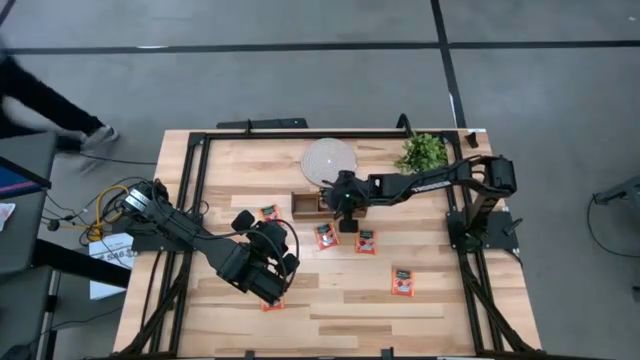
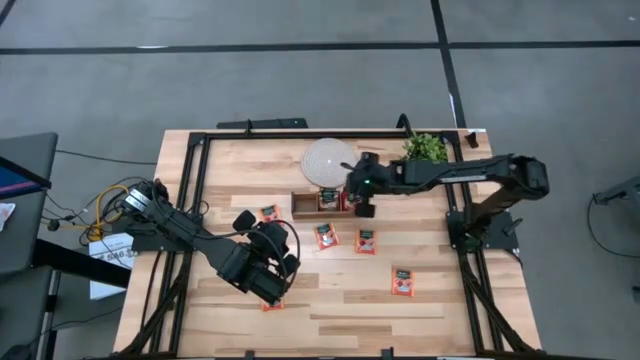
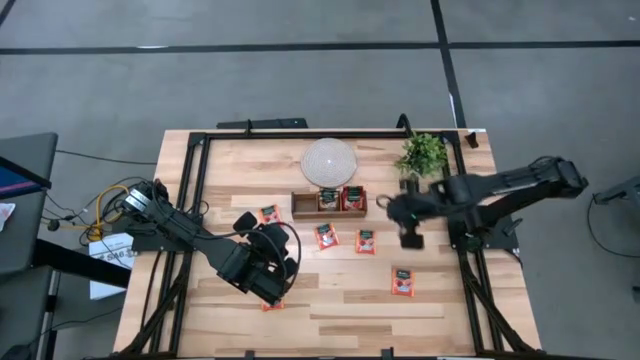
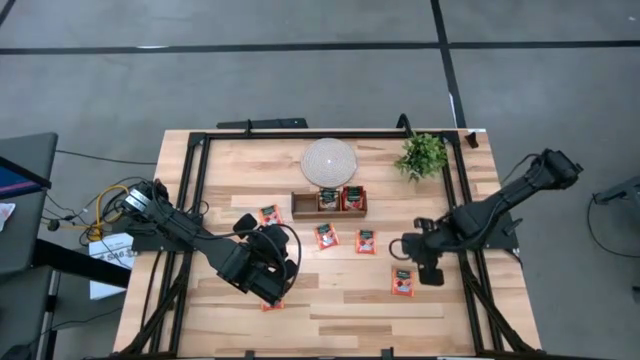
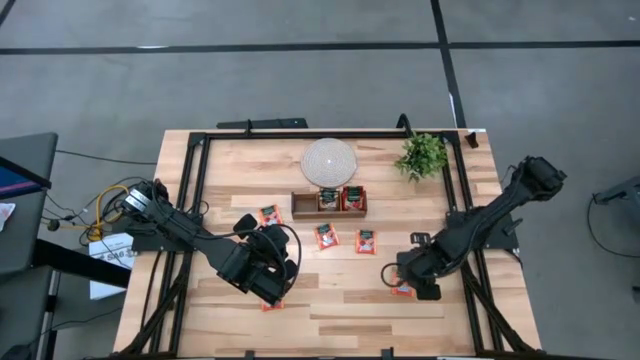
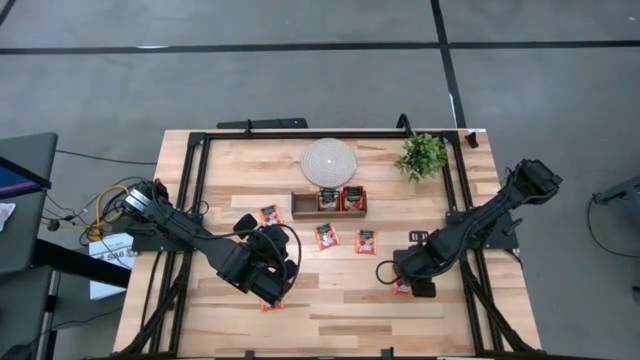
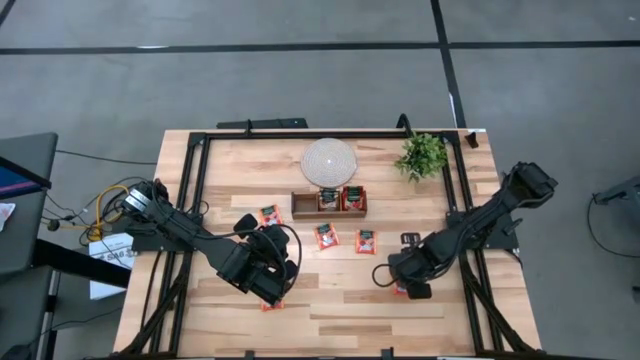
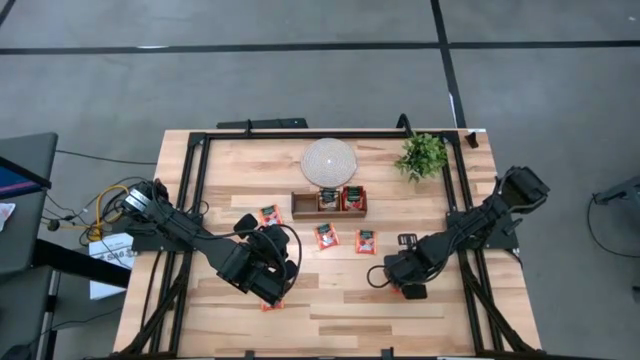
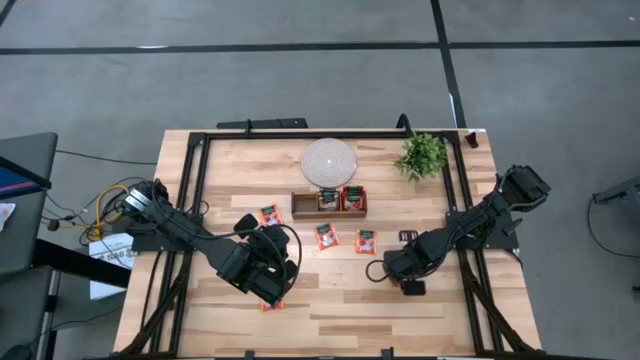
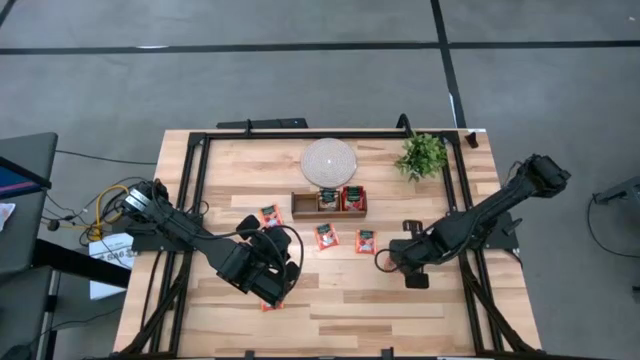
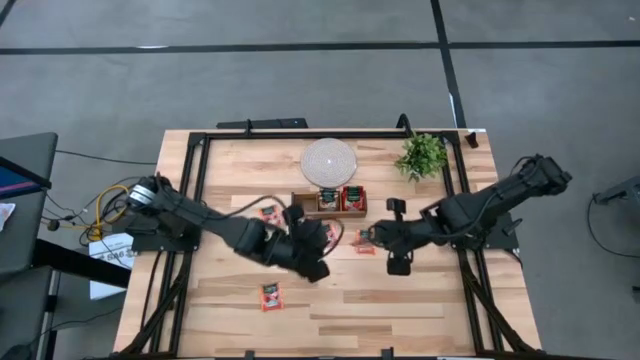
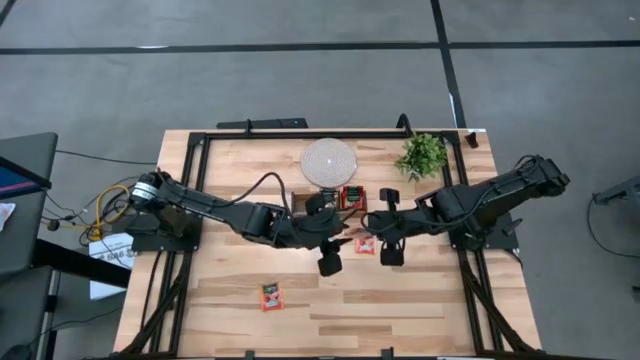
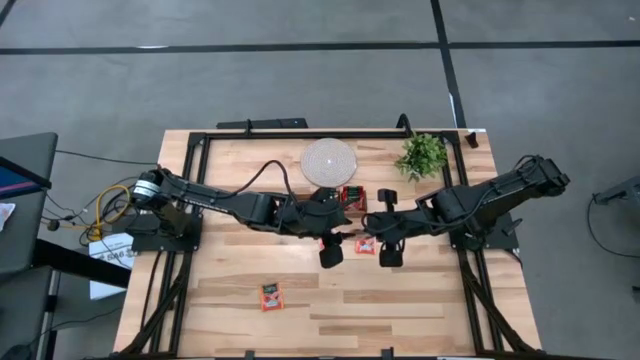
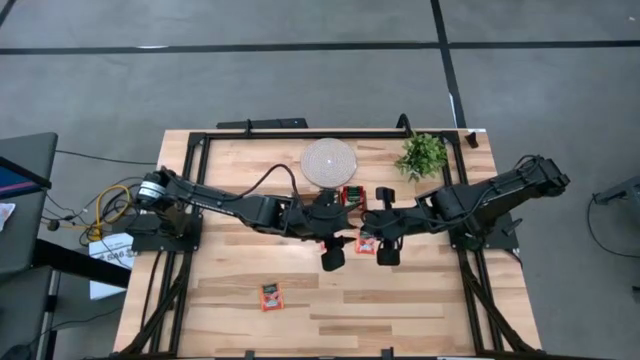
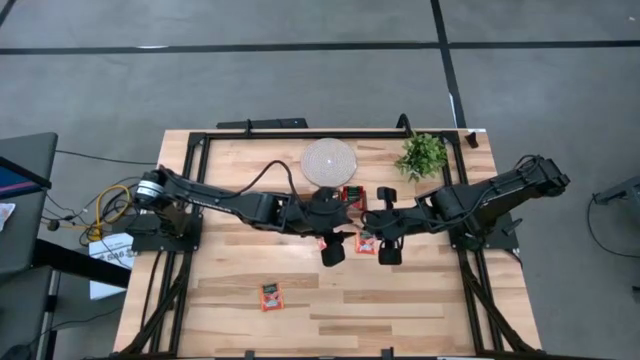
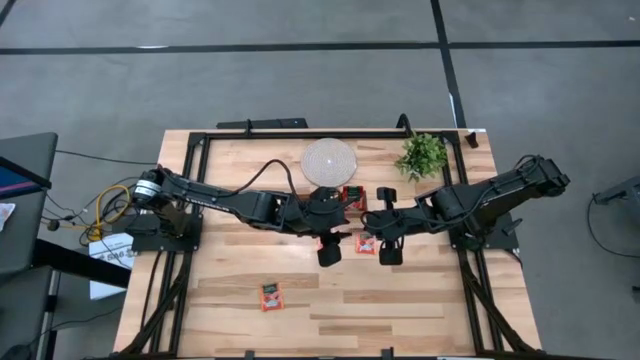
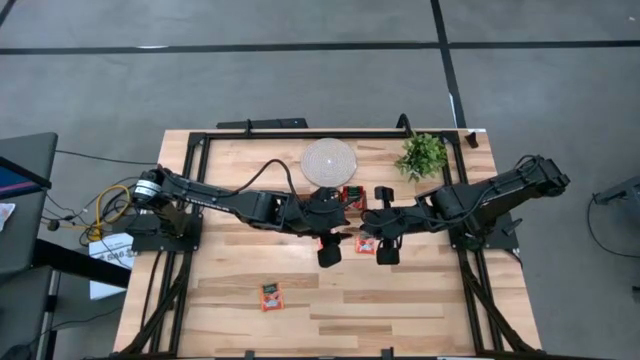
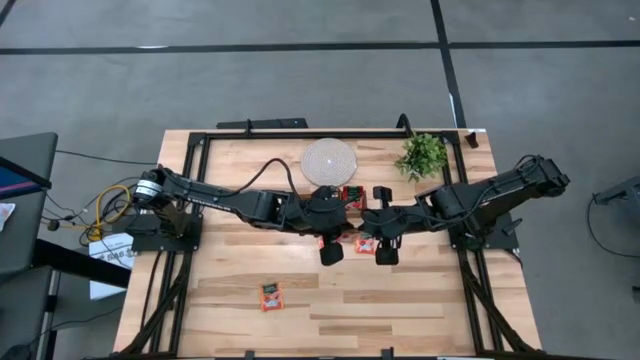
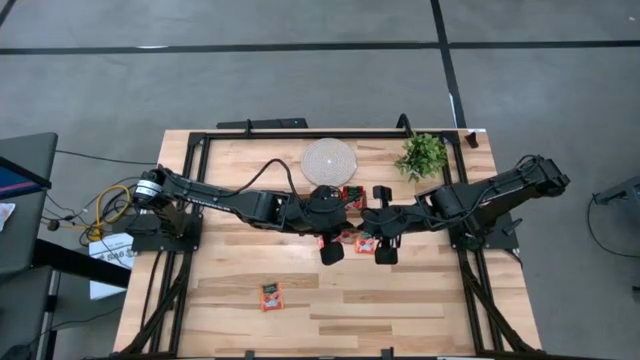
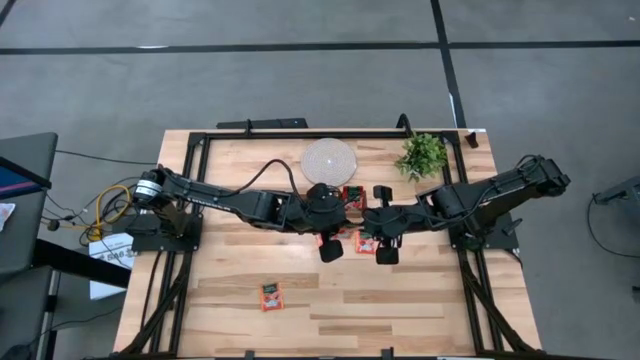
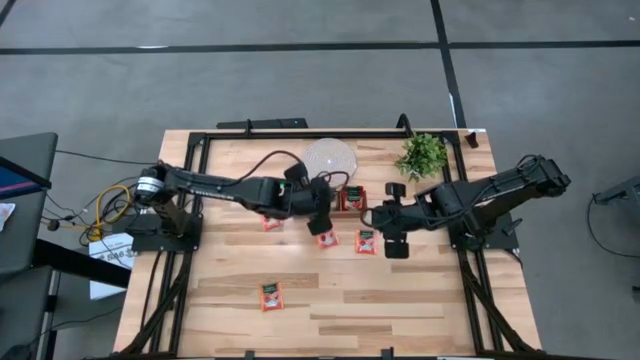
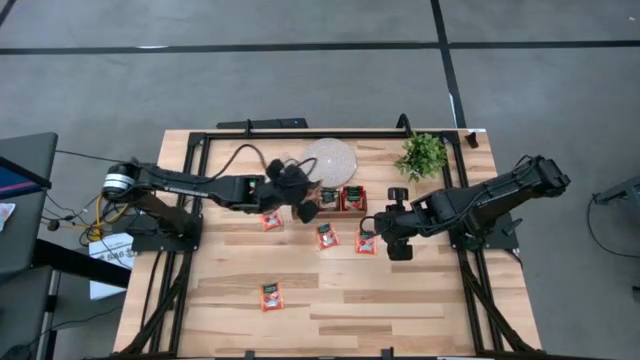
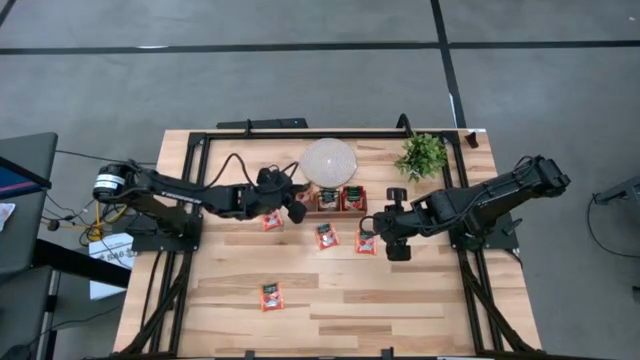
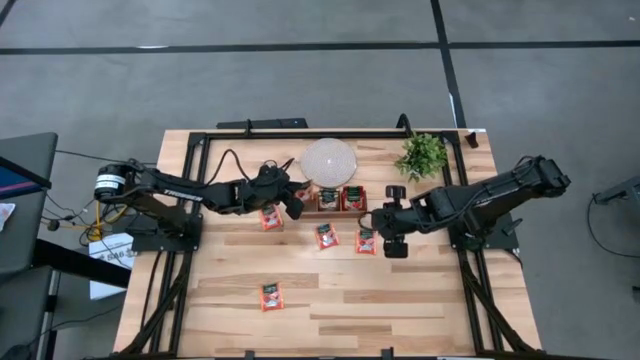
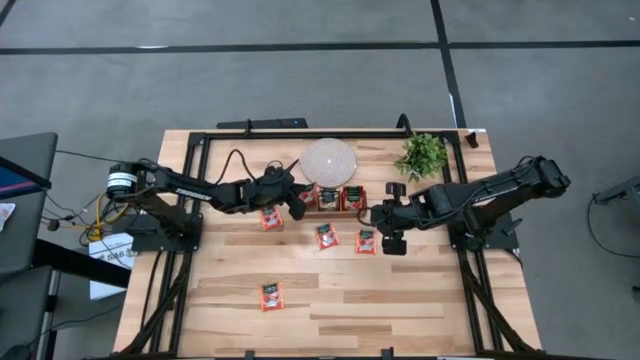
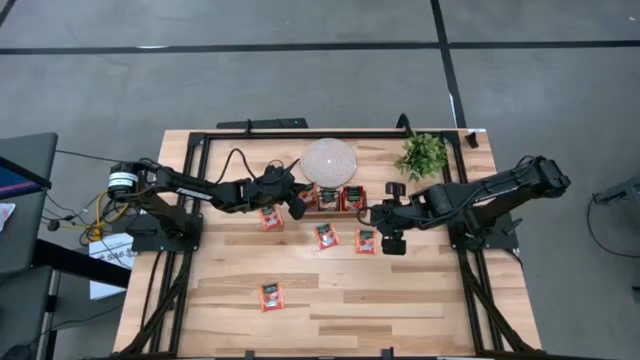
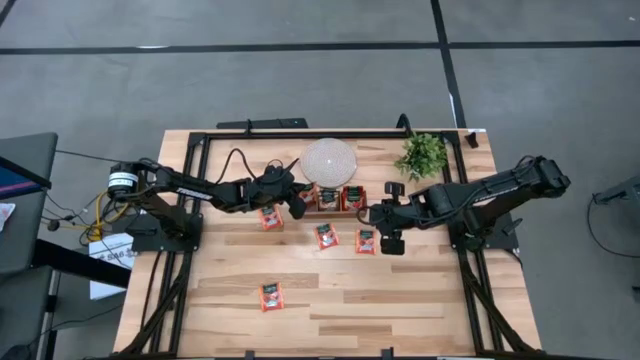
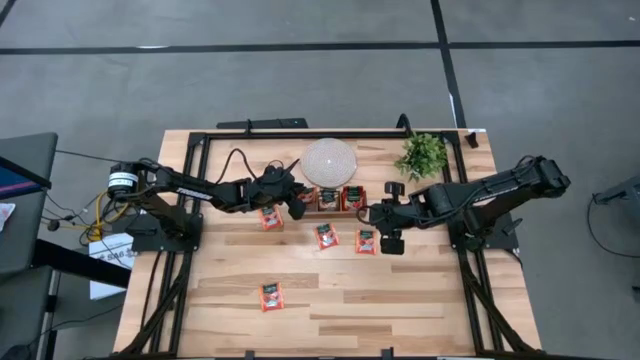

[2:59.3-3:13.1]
Task: Pick & Place Tea
Put the orange tea bag into the left slot of the wooden organizer

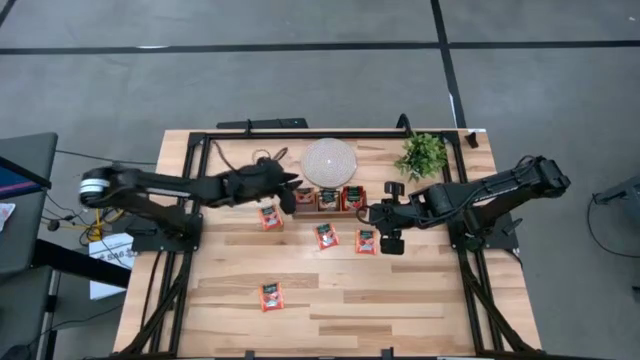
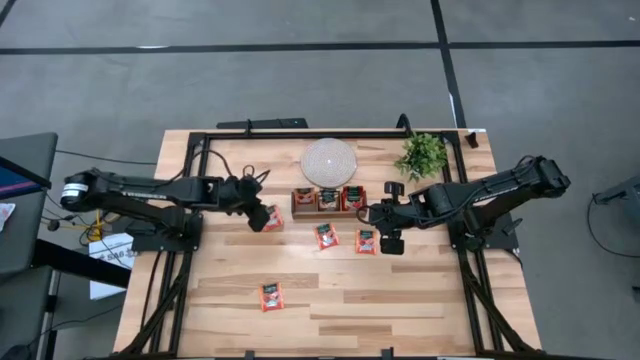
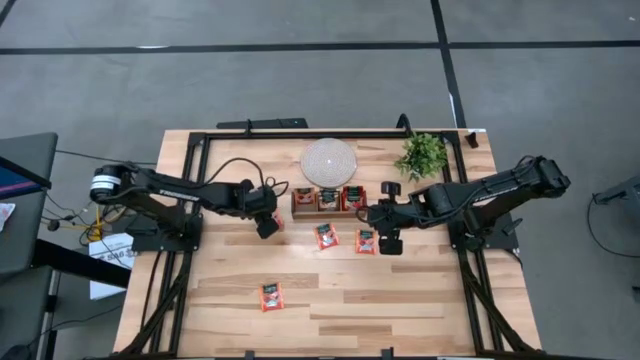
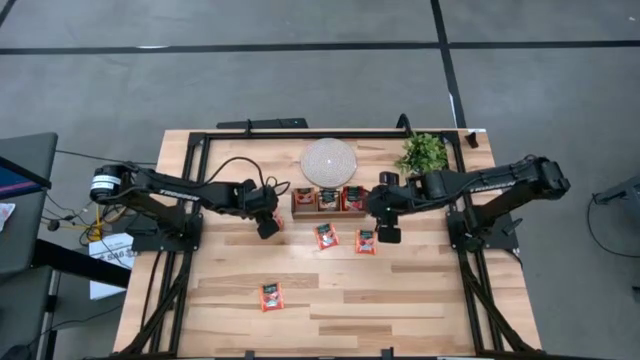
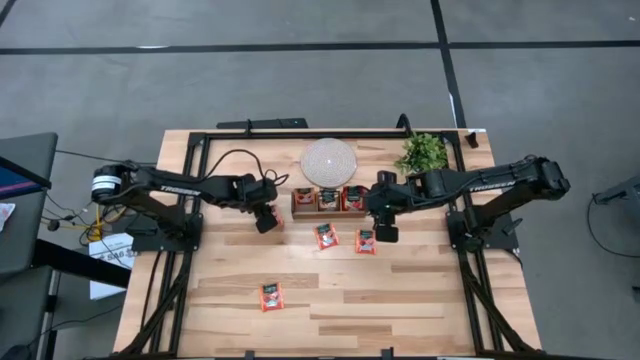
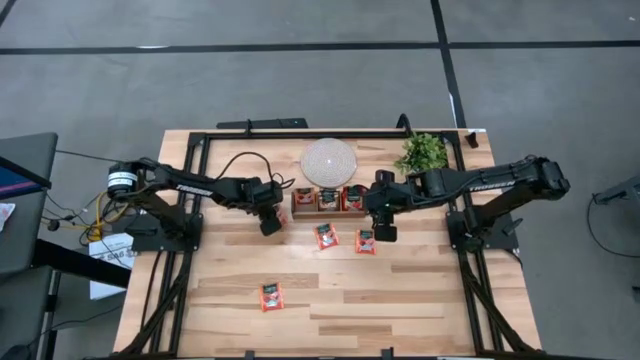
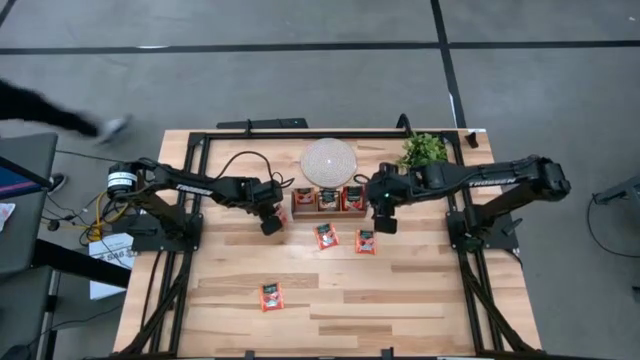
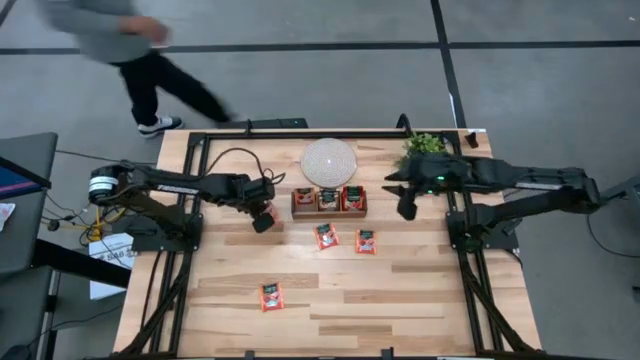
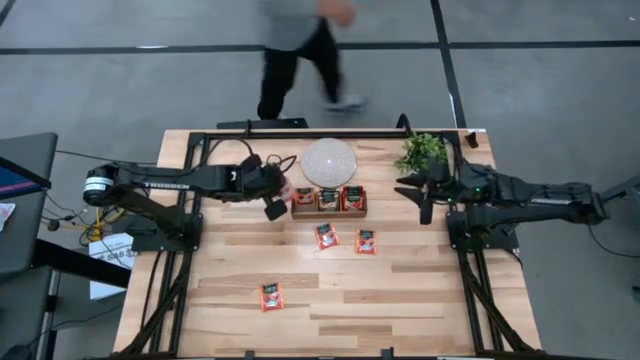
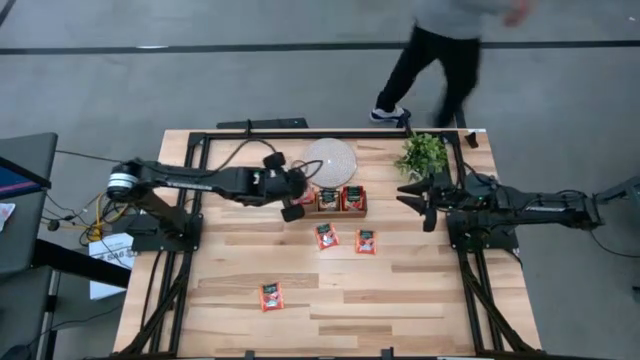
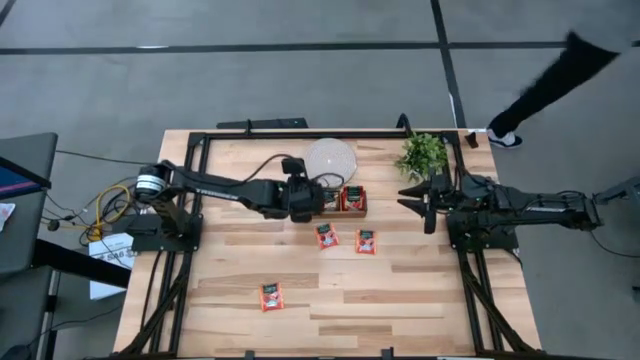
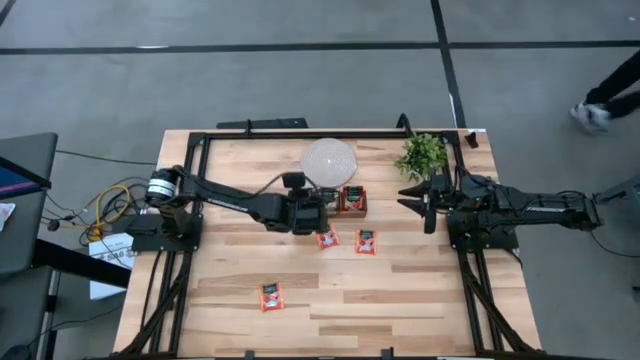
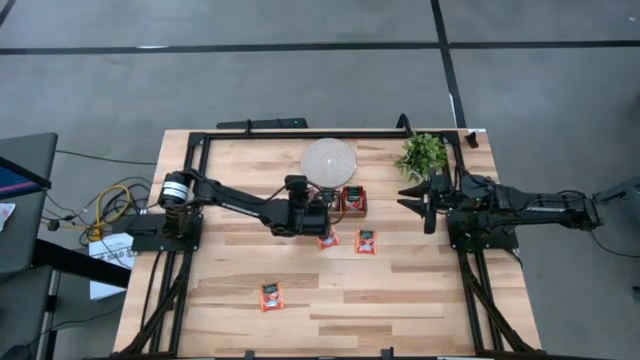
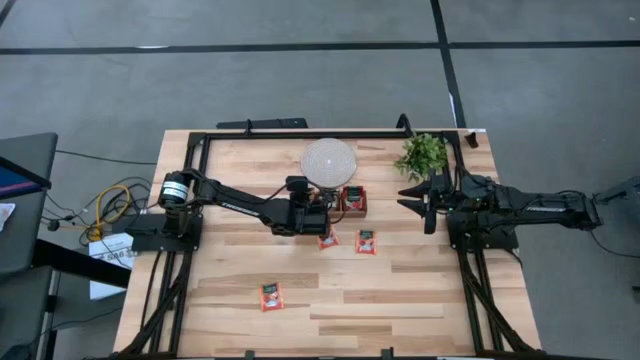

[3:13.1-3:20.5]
Put the orange tea bag into the left slot of the wooden organizer
